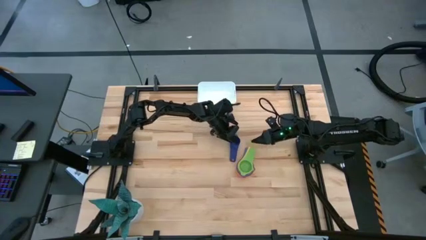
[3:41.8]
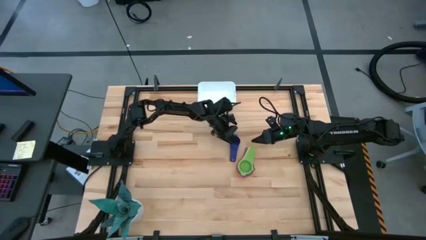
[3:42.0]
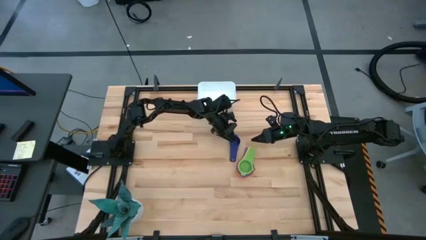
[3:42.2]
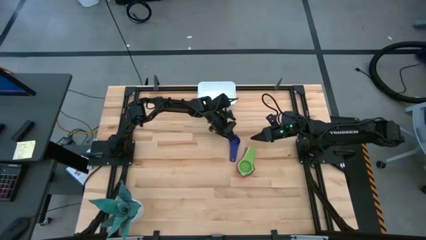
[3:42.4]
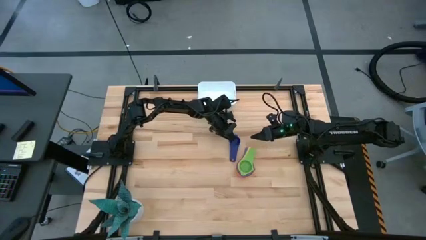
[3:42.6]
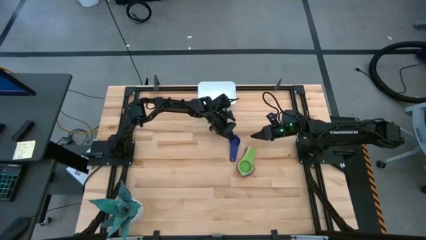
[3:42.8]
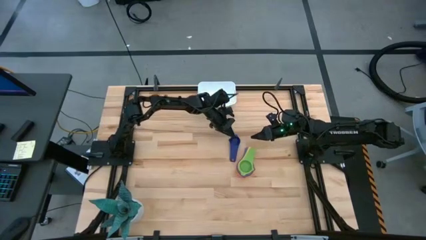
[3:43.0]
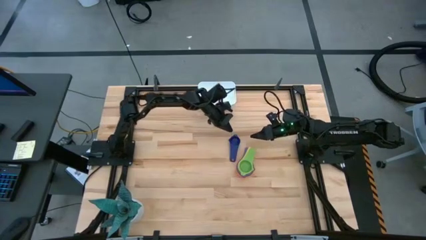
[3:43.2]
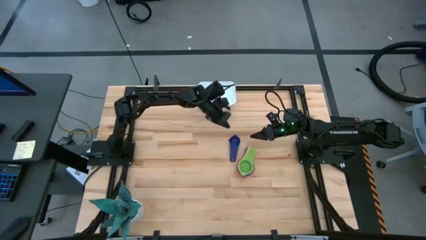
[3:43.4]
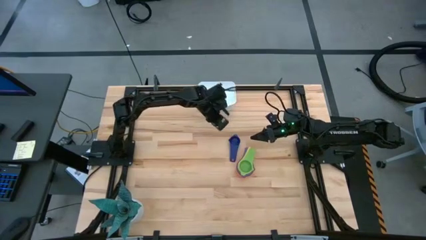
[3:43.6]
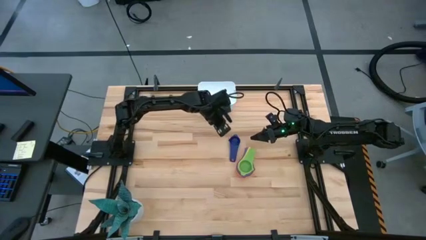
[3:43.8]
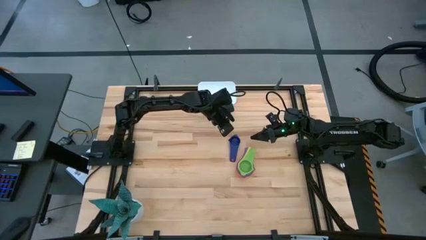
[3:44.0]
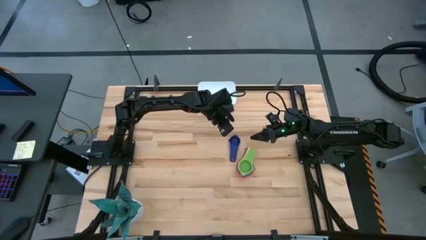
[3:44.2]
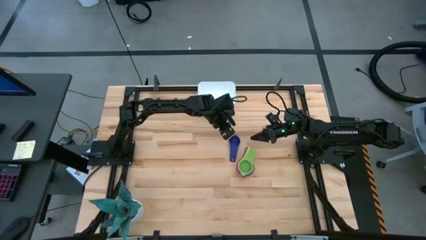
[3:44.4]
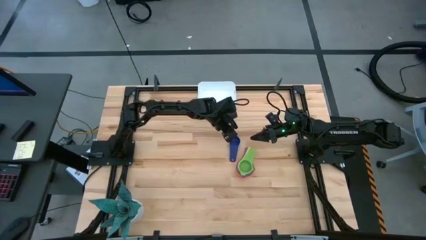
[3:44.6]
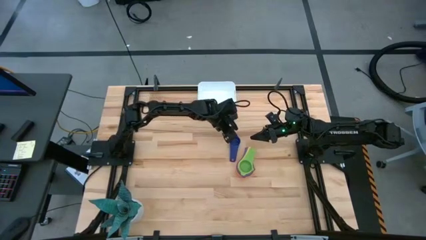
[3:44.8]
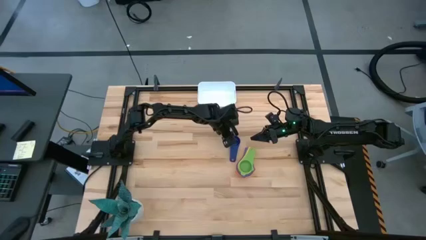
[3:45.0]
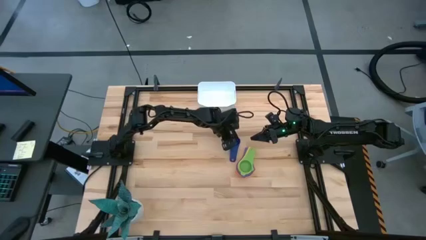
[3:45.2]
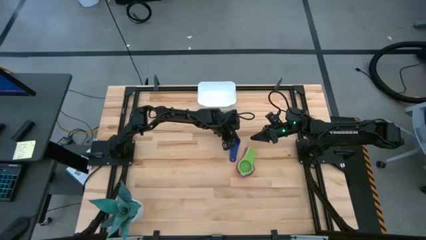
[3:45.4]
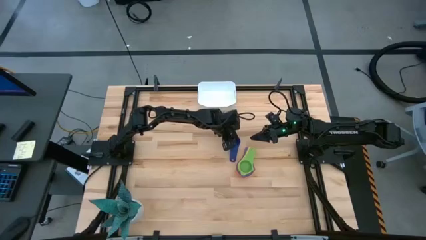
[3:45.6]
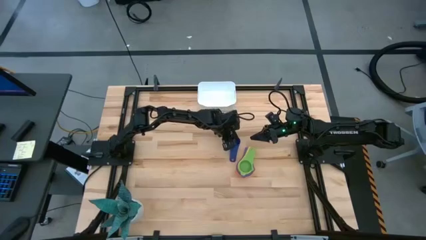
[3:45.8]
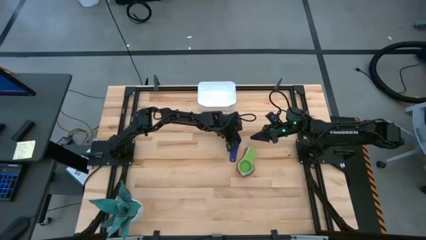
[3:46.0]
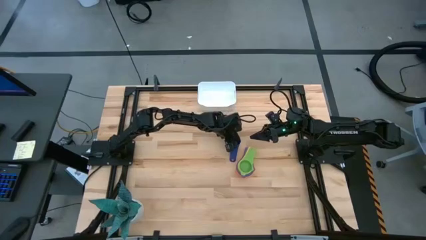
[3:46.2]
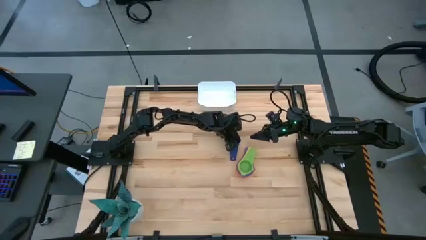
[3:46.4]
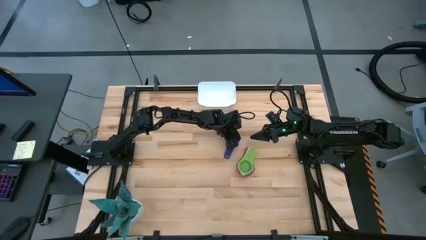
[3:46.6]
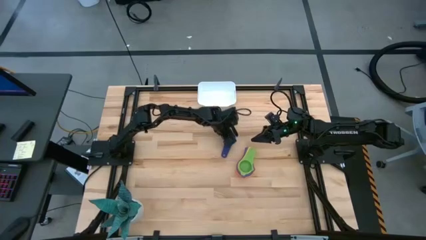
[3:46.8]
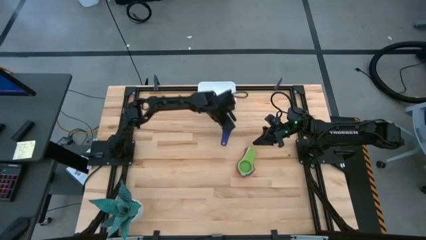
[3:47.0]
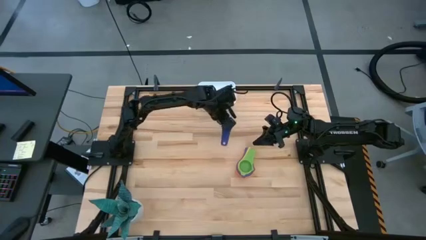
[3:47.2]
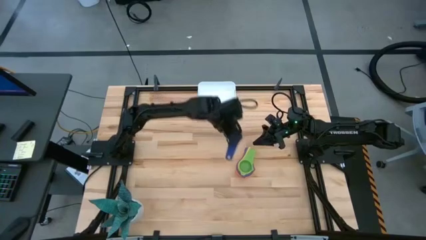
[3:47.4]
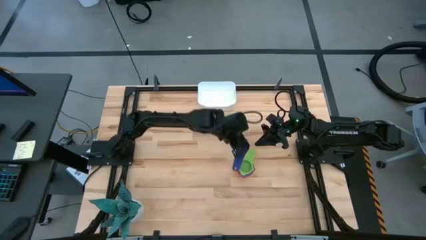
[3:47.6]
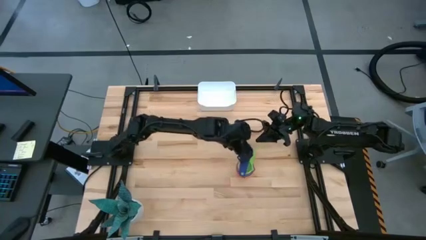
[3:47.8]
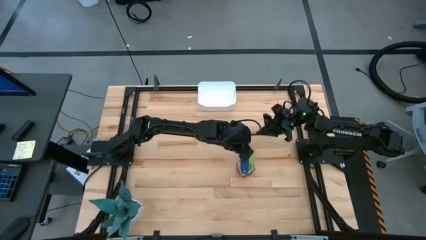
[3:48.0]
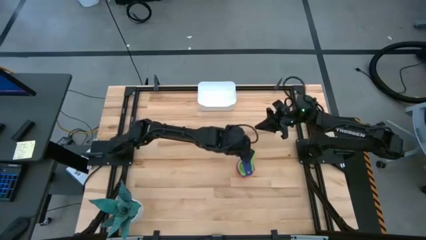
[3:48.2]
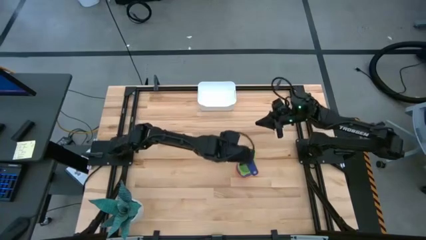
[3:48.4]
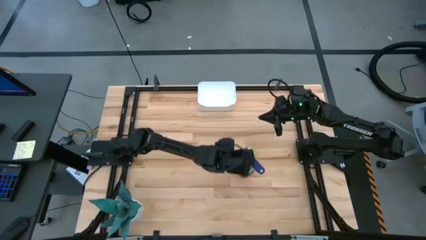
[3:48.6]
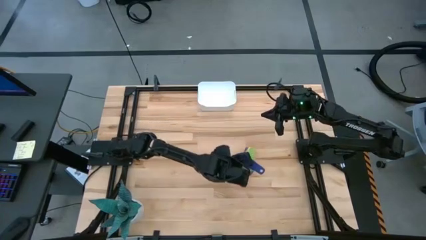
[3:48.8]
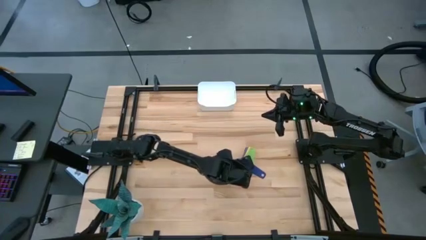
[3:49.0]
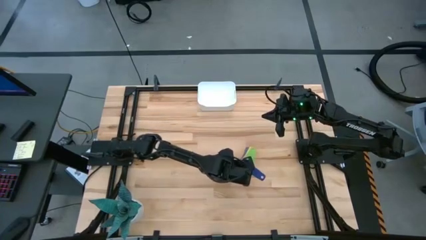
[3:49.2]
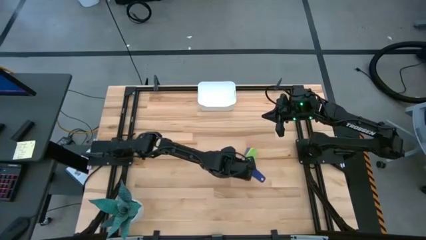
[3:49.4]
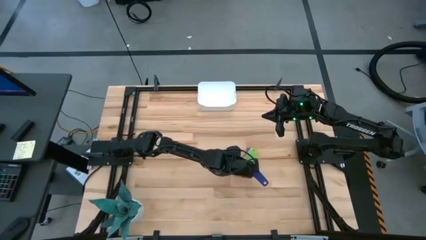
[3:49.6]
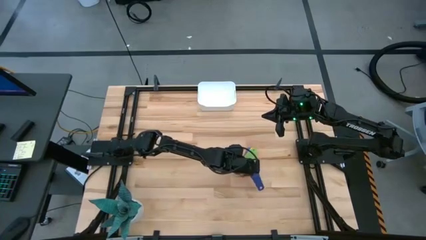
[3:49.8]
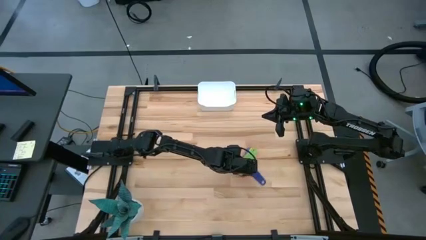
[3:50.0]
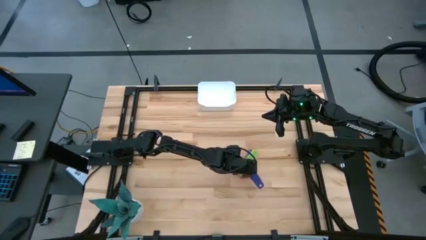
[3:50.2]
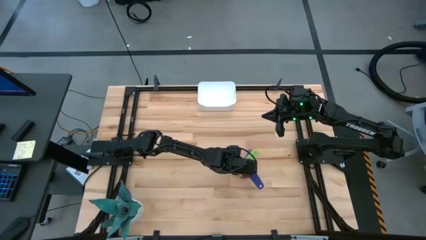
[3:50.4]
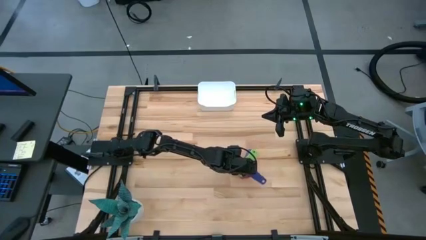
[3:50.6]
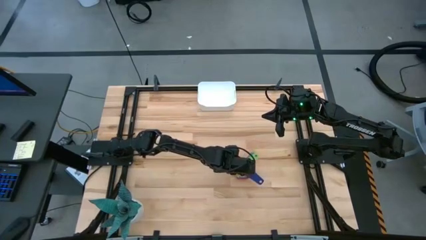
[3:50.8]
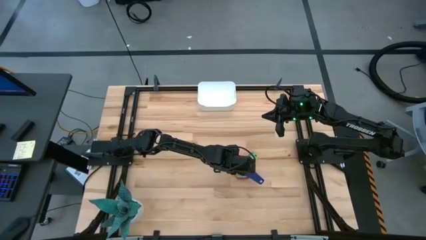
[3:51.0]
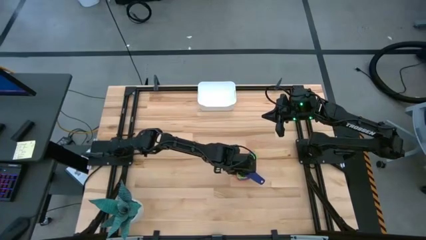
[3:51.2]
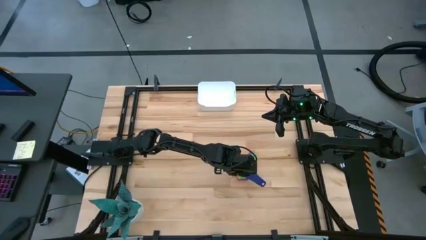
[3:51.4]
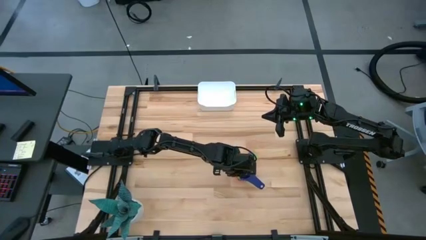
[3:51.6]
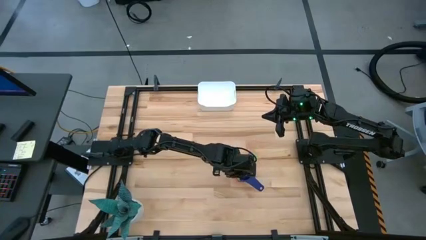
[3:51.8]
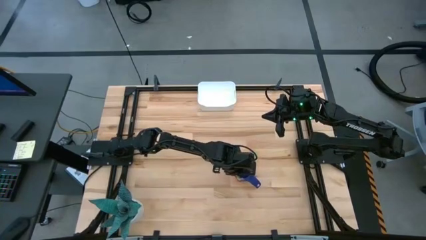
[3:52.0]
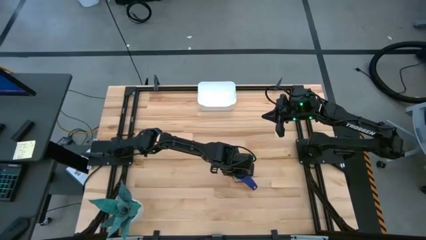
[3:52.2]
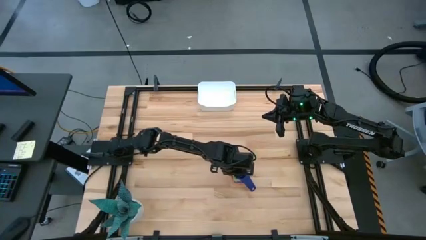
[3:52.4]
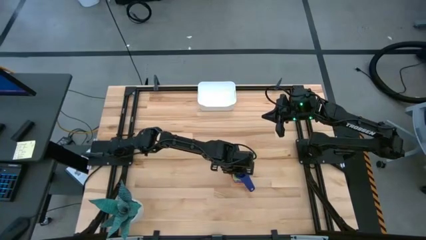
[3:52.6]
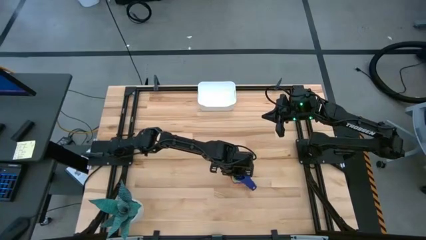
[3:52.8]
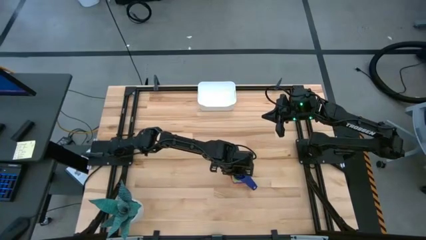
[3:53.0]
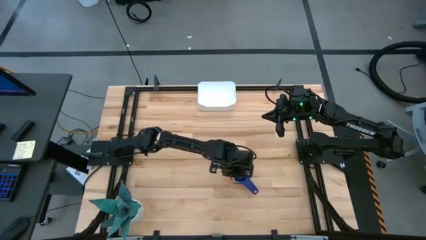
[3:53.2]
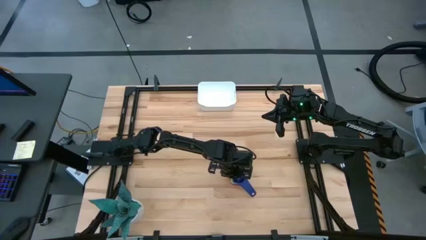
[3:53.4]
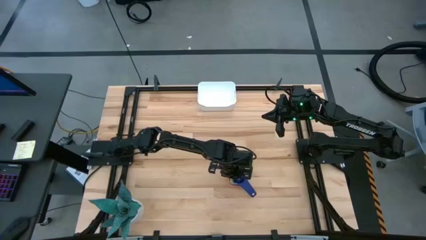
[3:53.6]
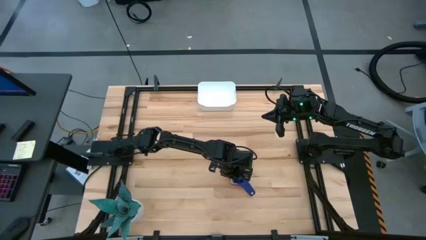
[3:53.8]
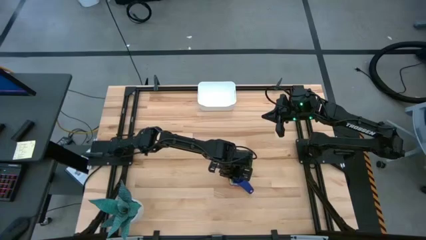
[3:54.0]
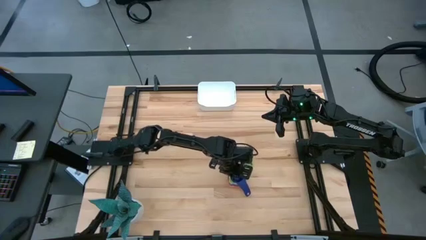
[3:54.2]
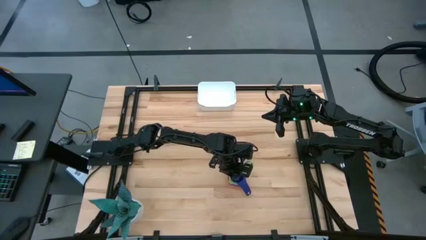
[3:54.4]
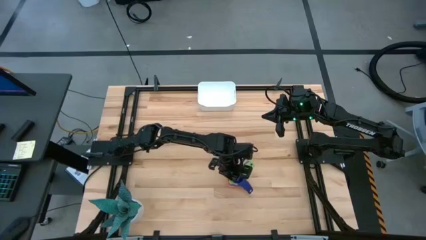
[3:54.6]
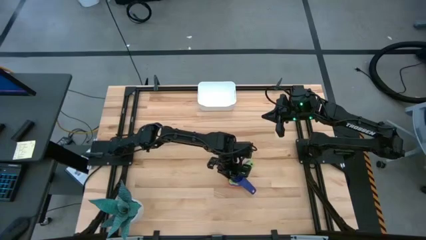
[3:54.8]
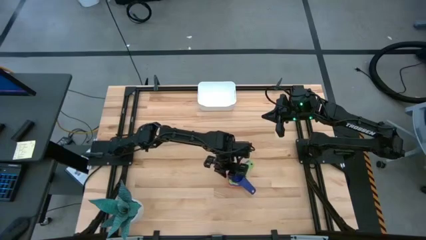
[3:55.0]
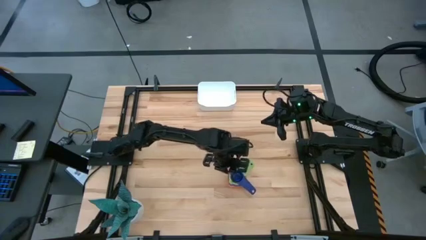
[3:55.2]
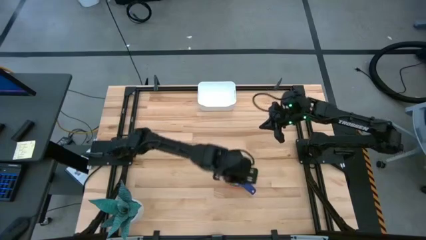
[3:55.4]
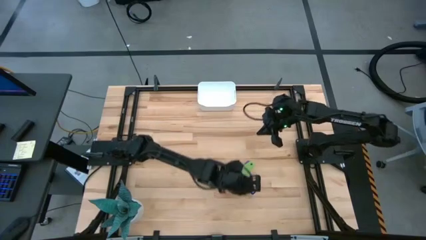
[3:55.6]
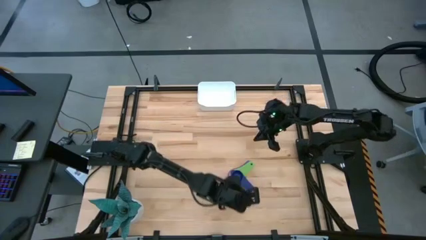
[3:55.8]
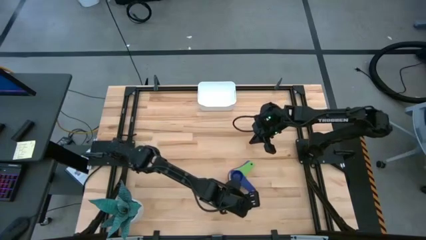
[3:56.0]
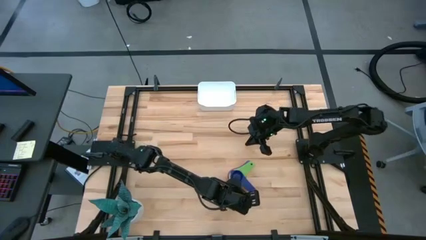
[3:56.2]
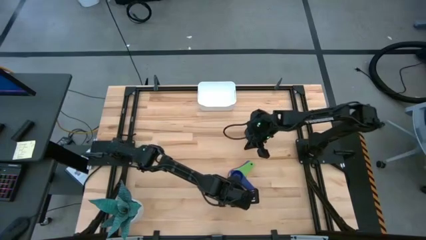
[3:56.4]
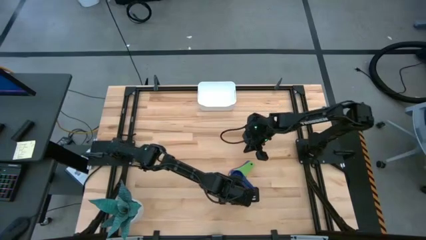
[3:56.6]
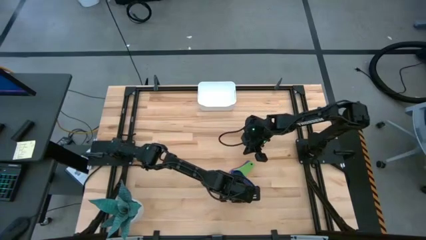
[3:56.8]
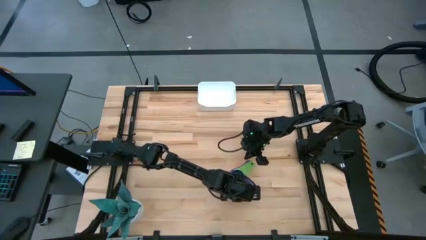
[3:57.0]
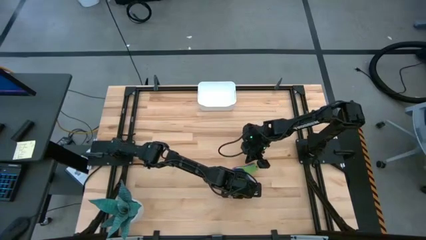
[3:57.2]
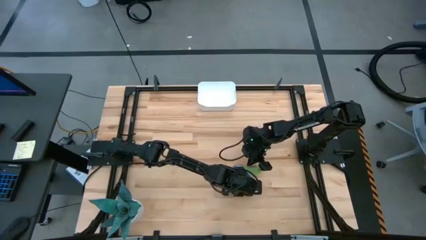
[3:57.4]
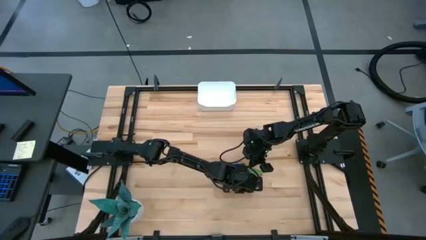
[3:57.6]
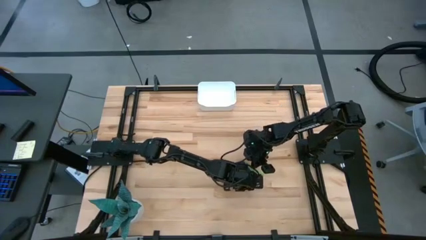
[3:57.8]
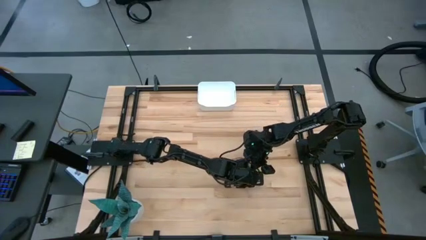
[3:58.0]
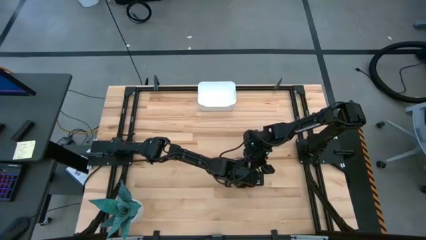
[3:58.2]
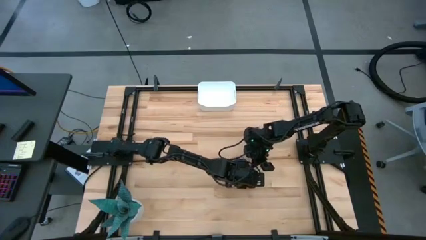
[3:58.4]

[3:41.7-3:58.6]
Task: Nest measuring cups in basket
Stack the dark blue measuring cup on top of the green measuring cup
